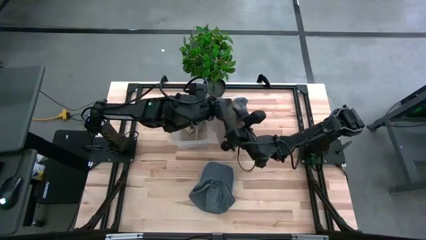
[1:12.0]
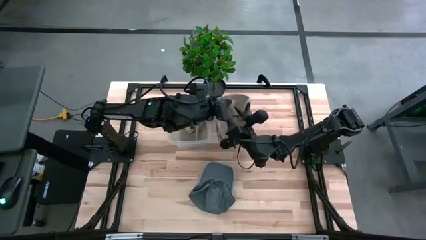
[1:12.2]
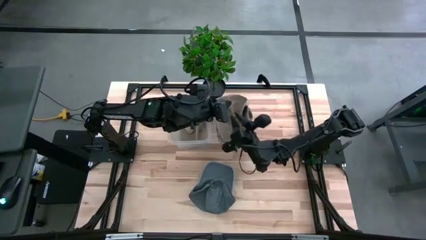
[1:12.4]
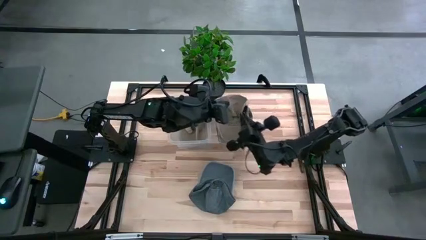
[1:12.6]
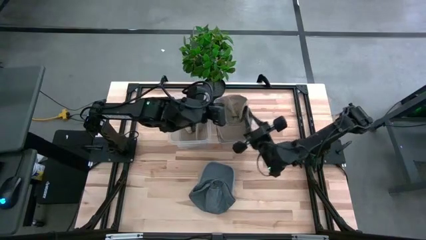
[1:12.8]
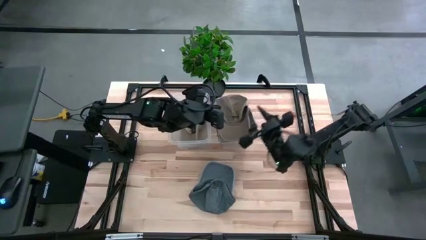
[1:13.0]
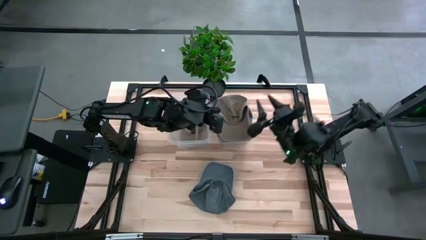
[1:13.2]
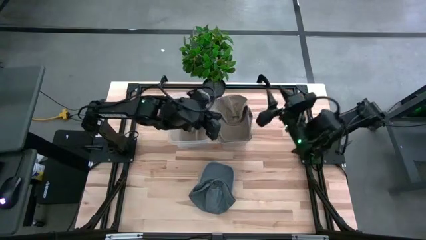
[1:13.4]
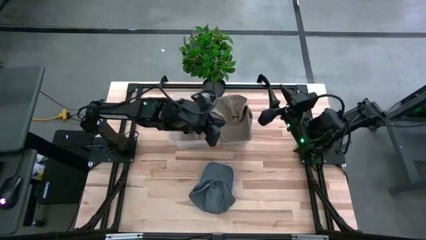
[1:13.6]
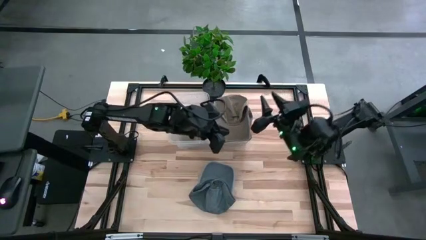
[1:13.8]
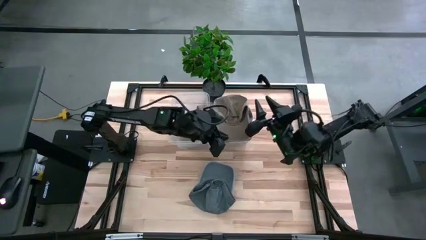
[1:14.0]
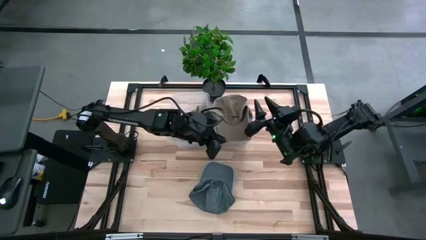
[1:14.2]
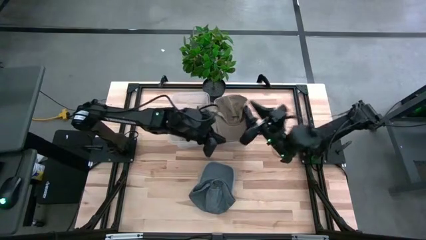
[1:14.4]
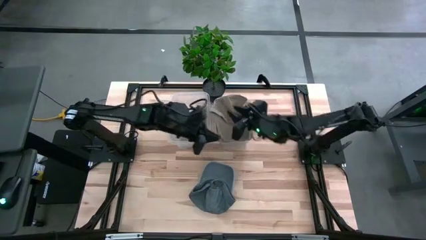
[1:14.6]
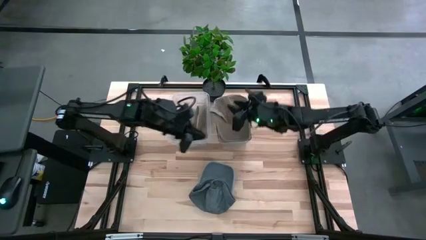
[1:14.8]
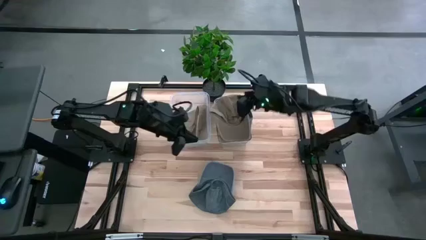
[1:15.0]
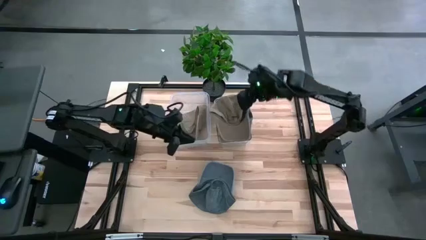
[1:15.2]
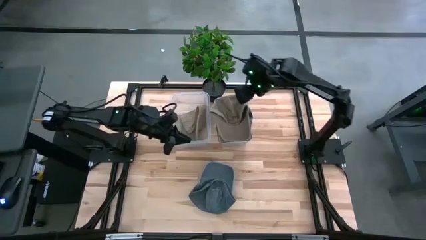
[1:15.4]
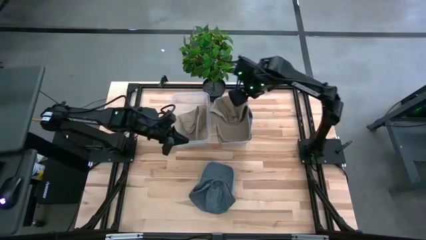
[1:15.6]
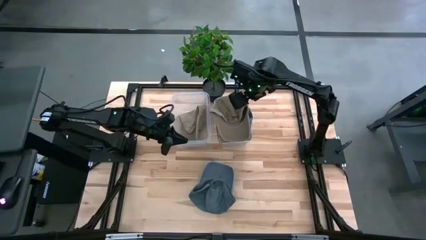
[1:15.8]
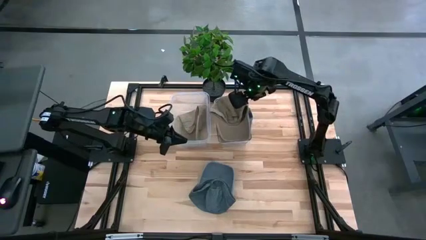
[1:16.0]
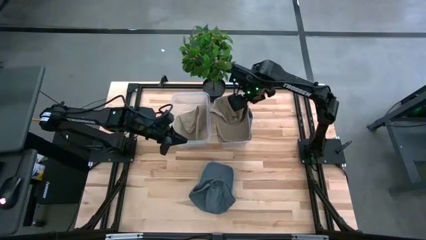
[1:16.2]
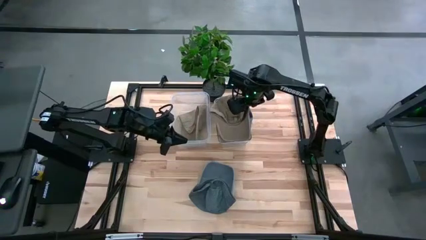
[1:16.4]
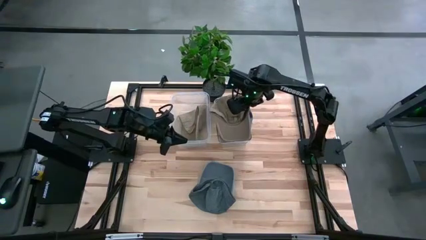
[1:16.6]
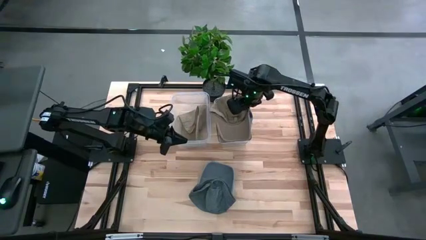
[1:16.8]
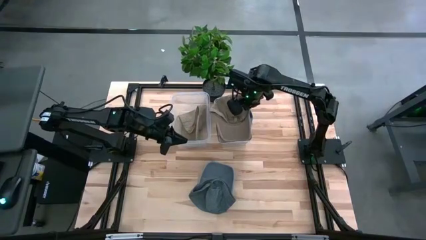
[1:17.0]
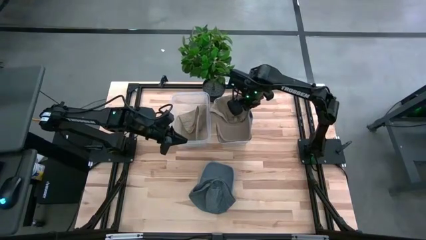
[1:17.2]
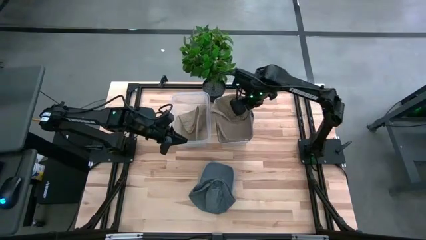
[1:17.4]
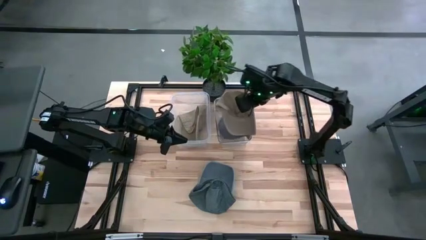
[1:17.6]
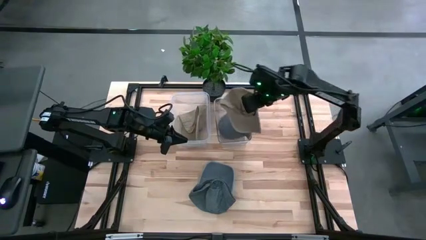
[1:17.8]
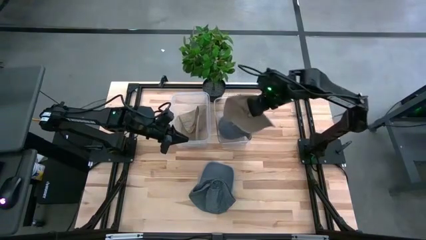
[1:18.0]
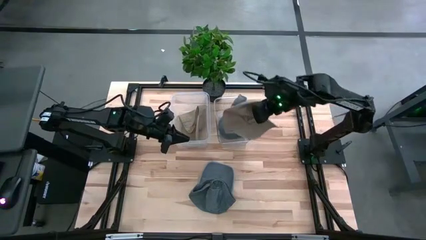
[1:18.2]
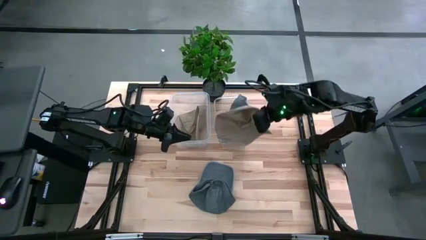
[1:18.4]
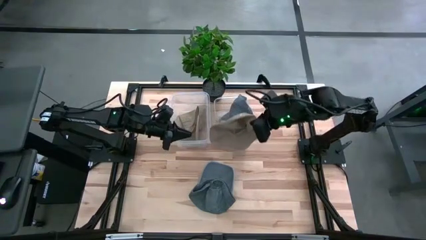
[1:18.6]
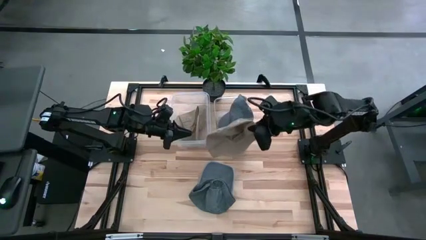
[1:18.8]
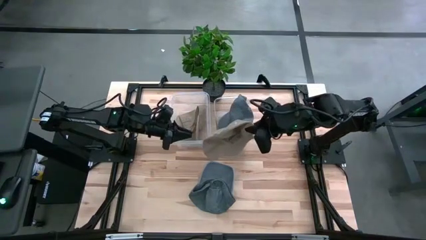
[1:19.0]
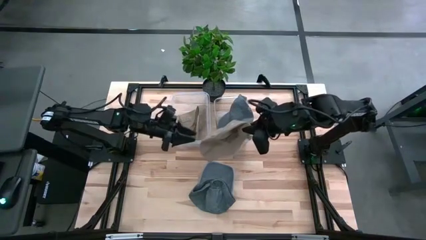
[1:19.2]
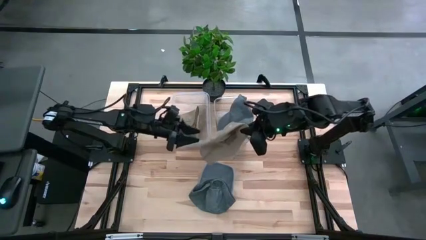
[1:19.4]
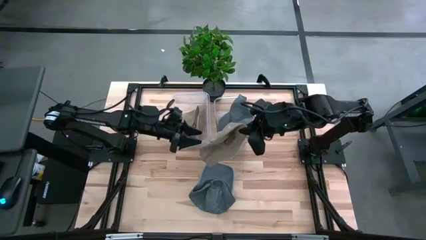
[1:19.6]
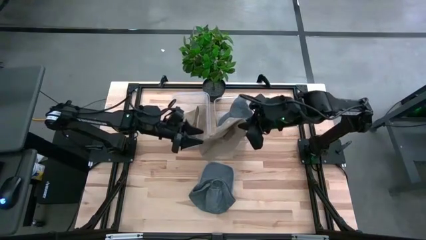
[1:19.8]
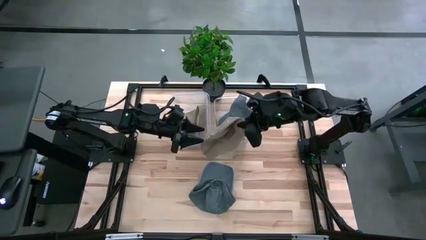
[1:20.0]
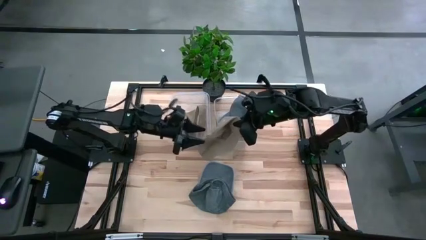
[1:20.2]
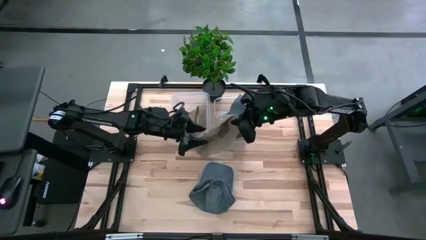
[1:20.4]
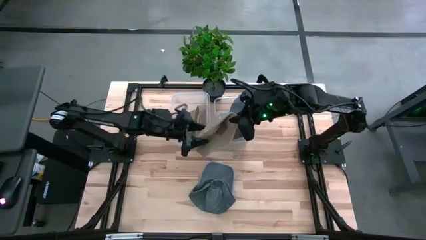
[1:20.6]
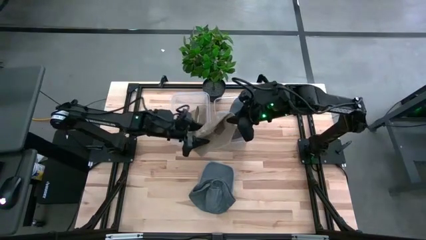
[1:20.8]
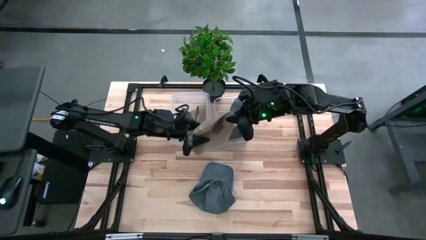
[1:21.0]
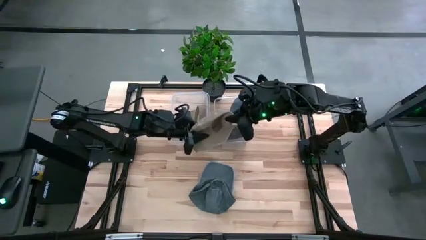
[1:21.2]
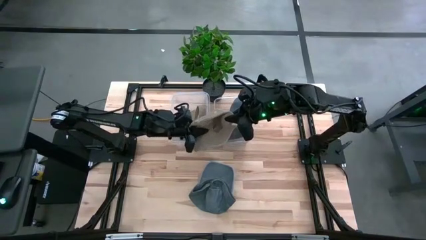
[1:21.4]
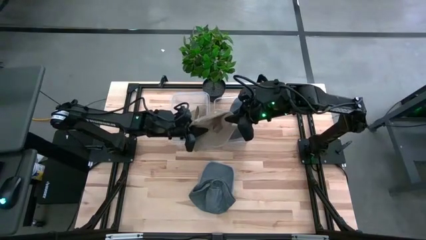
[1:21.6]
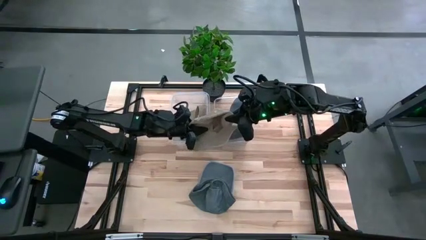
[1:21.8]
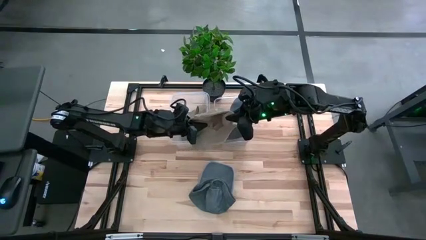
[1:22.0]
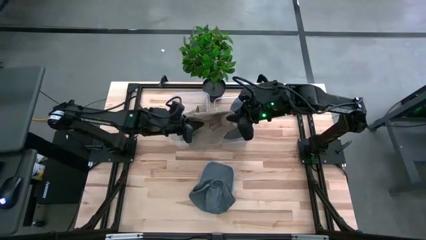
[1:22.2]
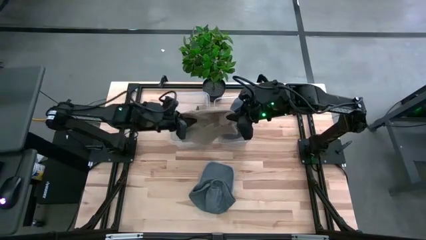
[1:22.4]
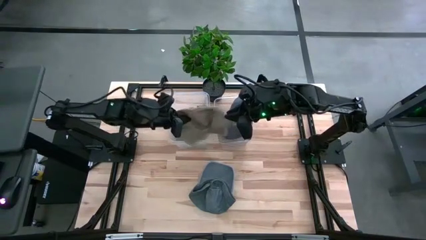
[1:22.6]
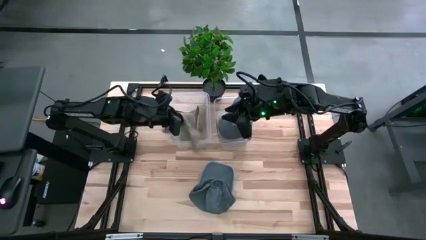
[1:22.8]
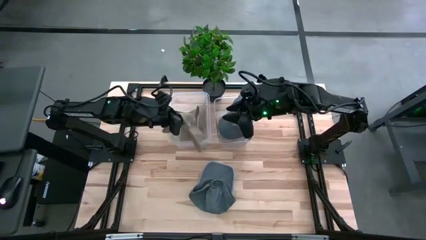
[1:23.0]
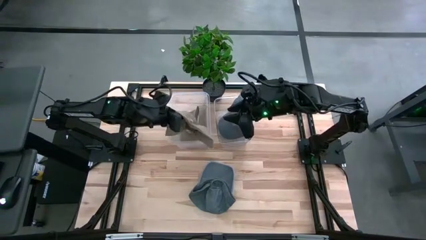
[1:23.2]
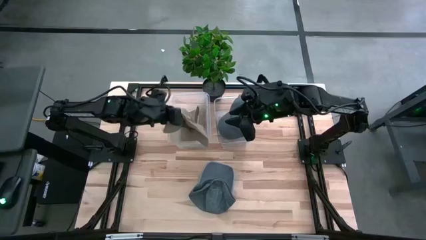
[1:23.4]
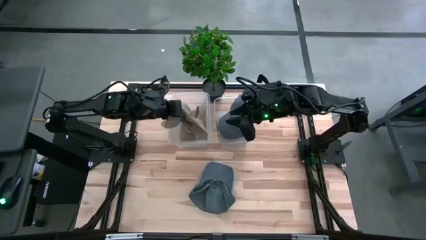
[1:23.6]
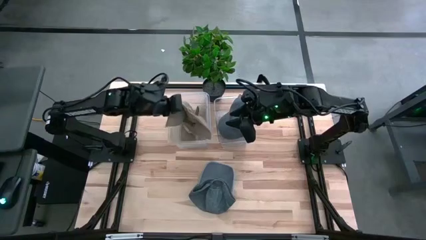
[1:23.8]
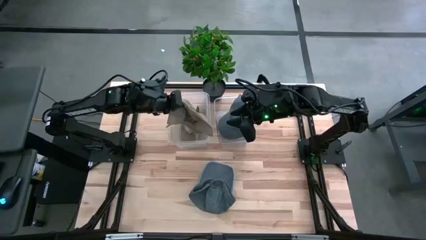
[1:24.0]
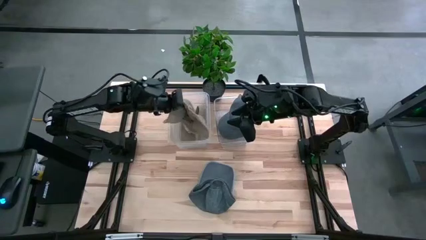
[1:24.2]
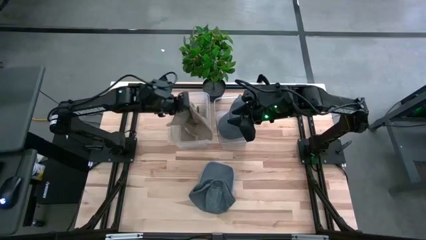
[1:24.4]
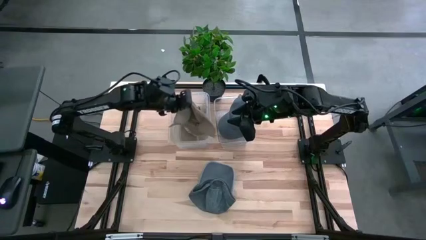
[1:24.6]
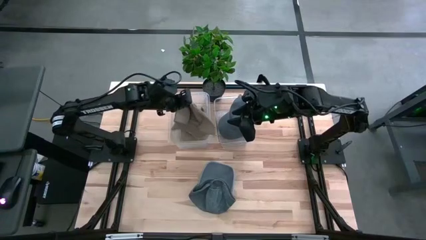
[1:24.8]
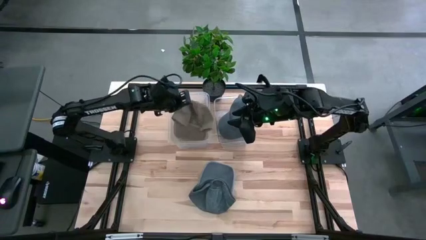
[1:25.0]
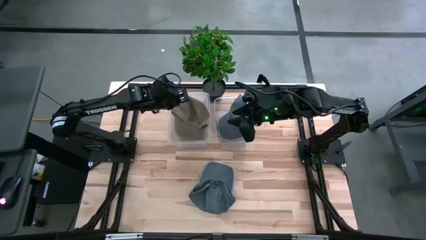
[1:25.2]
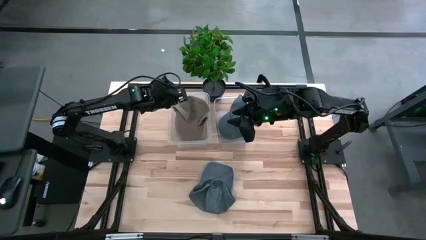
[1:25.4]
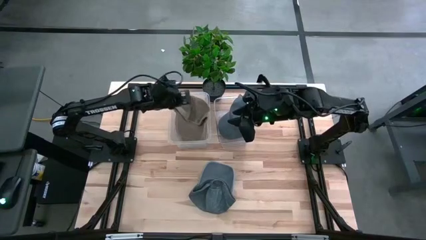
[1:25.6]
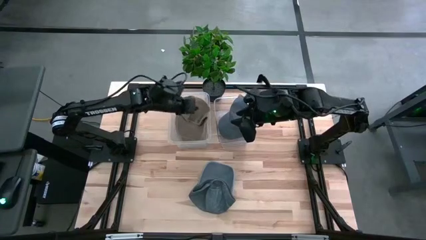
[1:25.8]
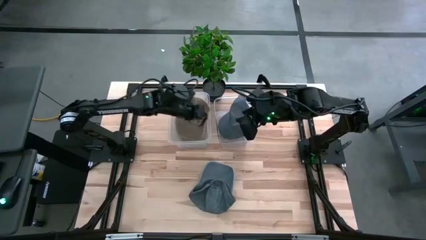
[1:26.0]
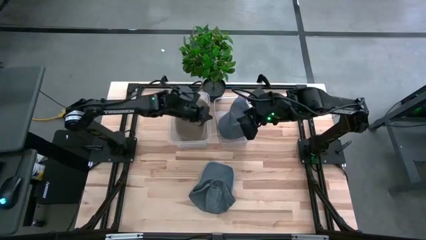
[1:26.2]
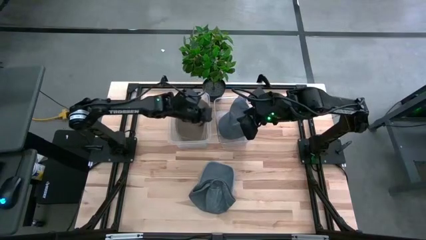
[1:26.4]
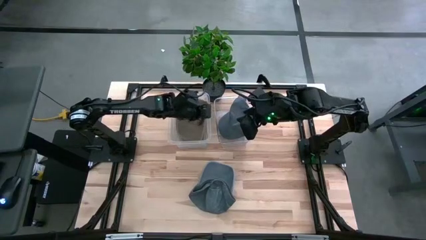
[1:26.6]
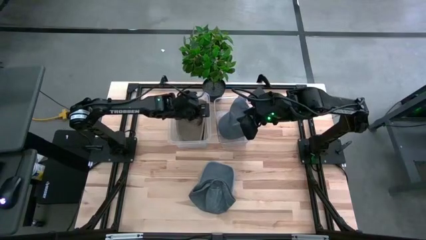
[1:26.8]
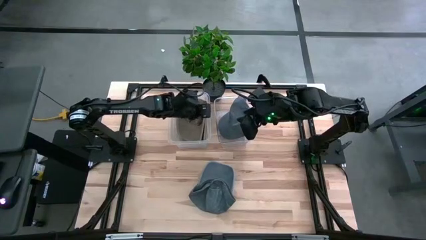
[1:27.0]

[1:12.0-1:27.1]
Task: Pick & Place hat
Put the brown cap into the left transparent bin
